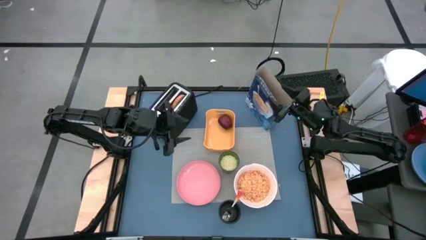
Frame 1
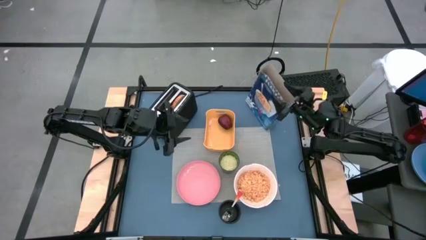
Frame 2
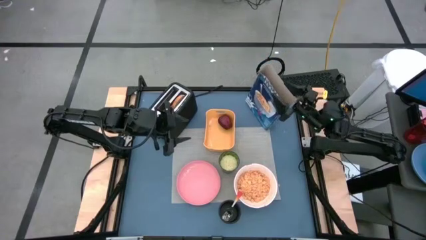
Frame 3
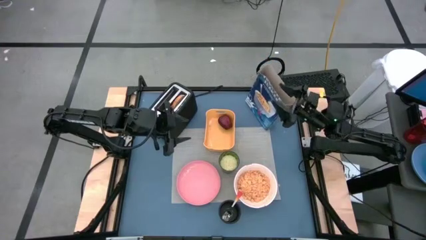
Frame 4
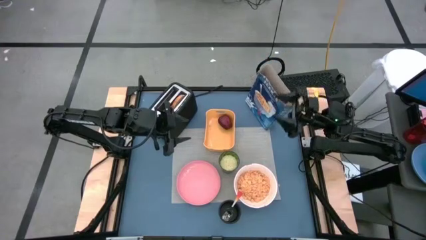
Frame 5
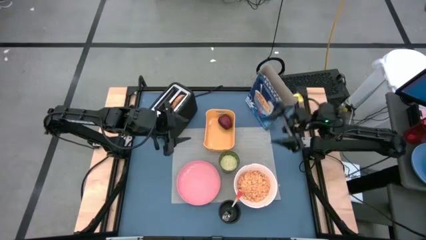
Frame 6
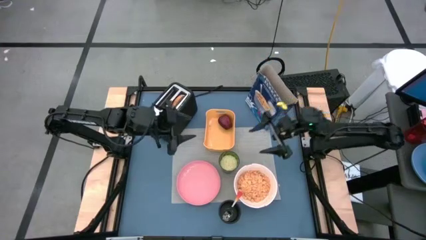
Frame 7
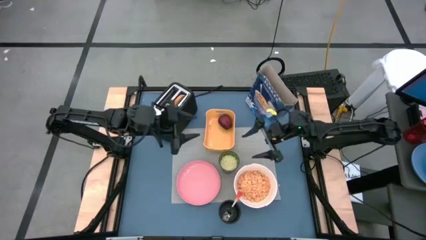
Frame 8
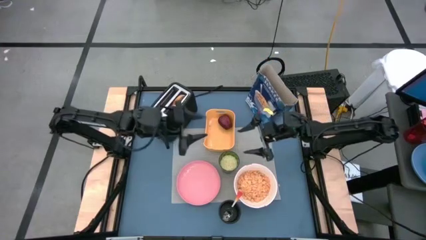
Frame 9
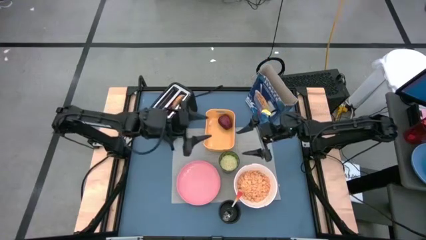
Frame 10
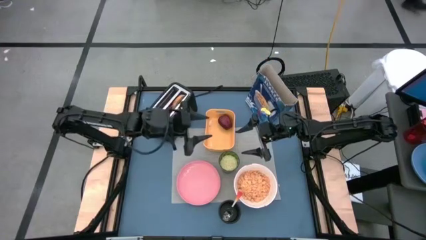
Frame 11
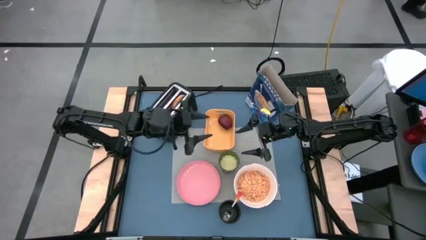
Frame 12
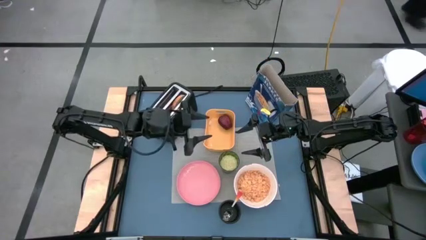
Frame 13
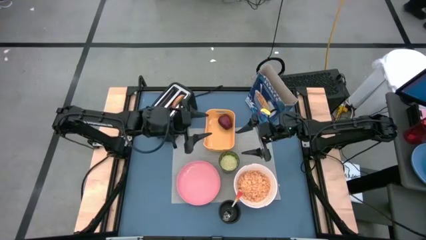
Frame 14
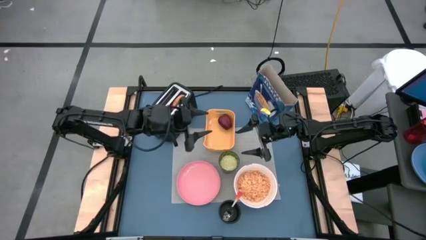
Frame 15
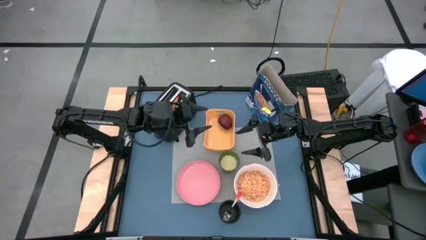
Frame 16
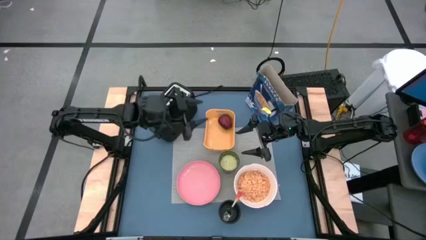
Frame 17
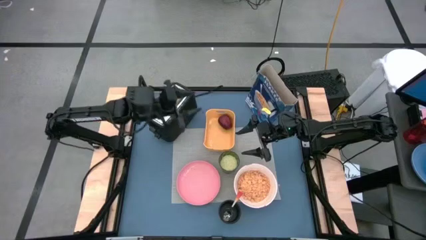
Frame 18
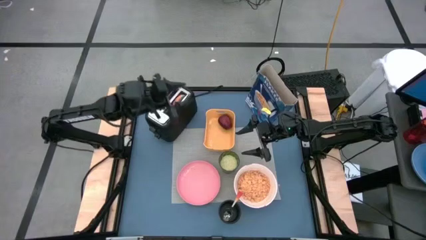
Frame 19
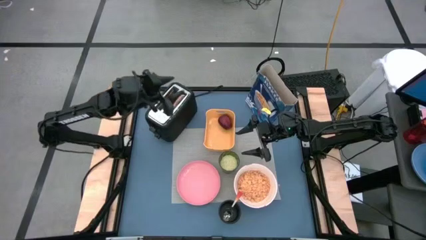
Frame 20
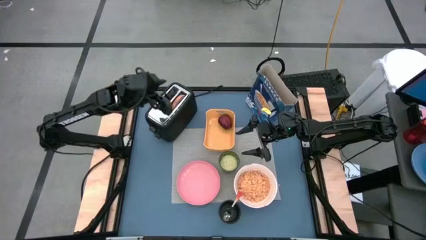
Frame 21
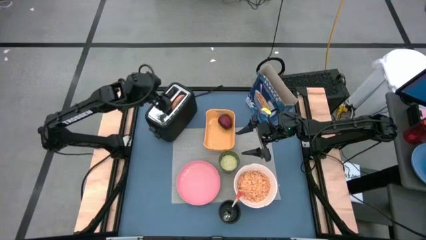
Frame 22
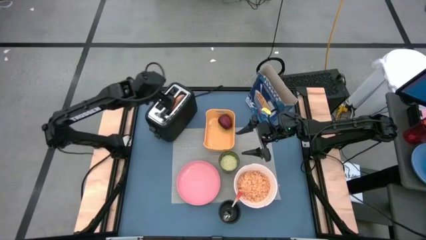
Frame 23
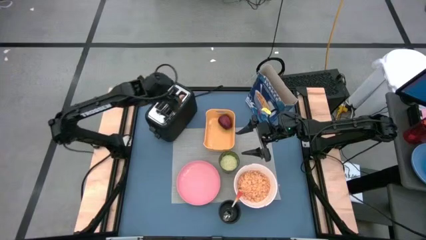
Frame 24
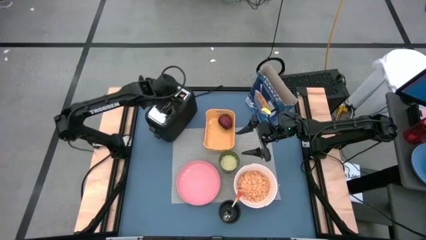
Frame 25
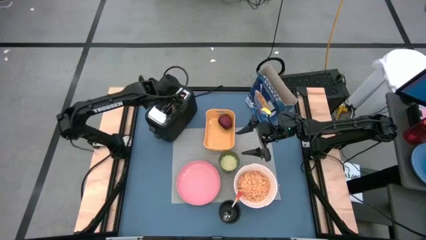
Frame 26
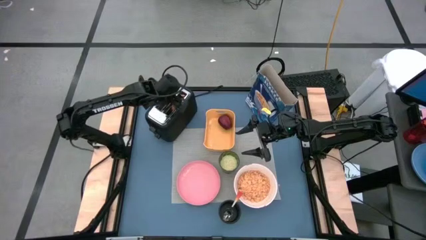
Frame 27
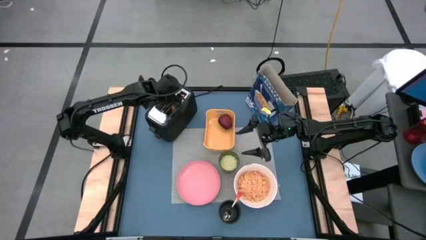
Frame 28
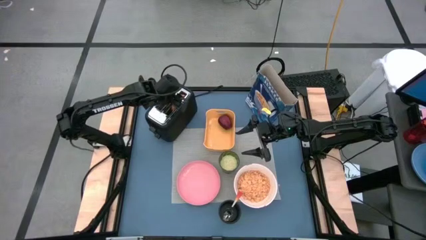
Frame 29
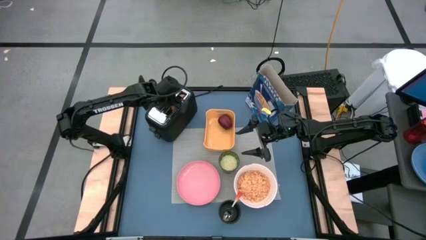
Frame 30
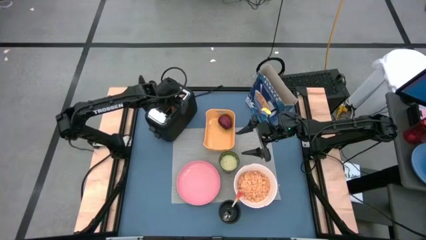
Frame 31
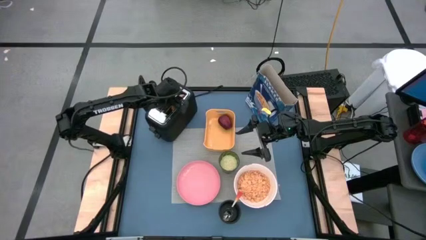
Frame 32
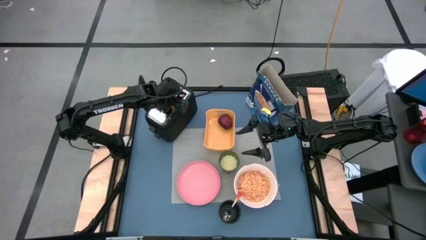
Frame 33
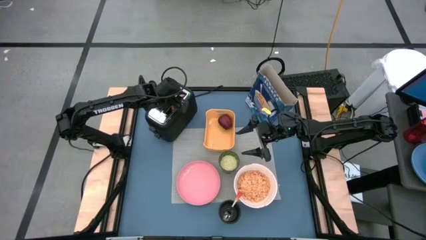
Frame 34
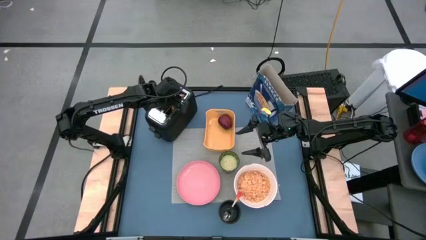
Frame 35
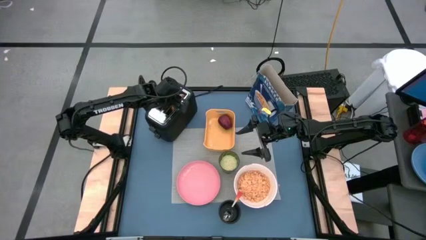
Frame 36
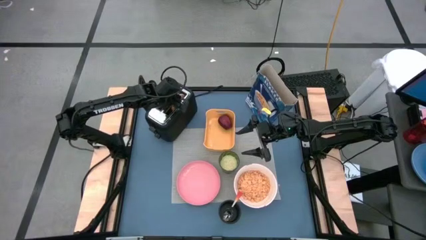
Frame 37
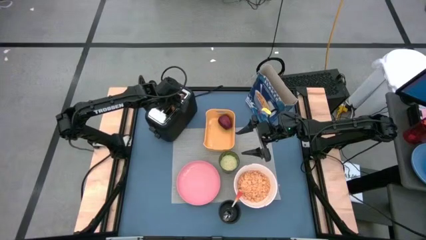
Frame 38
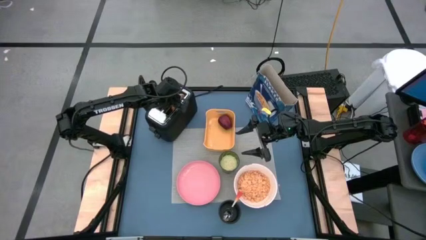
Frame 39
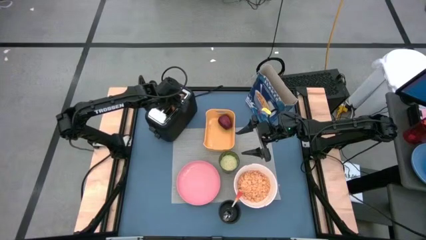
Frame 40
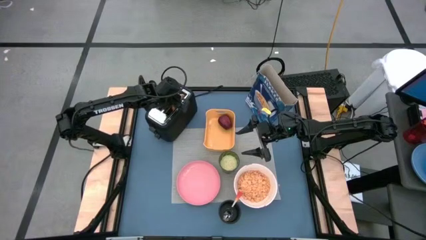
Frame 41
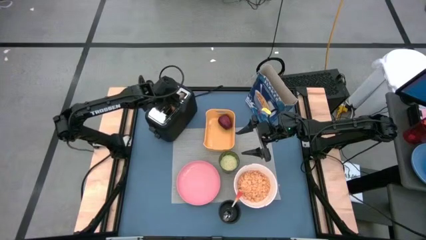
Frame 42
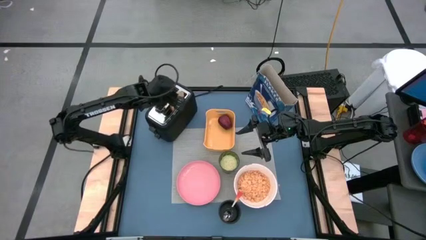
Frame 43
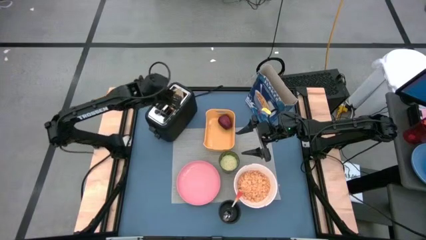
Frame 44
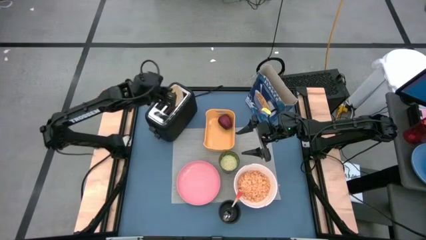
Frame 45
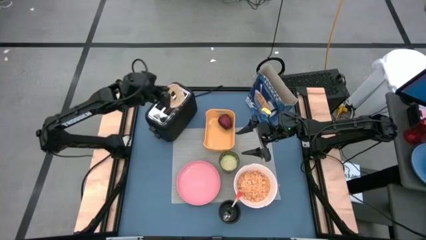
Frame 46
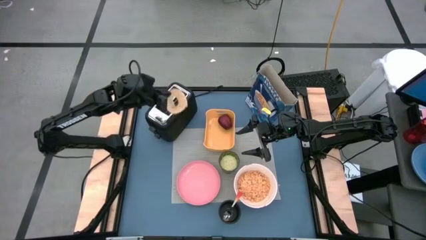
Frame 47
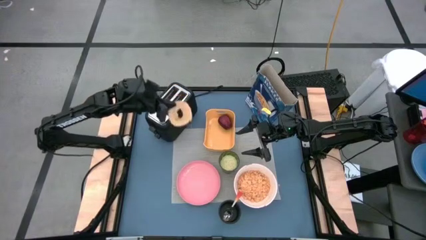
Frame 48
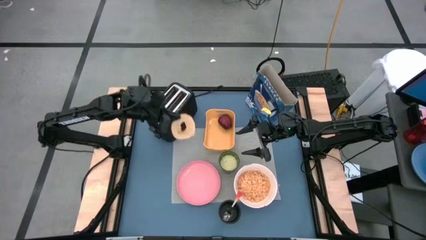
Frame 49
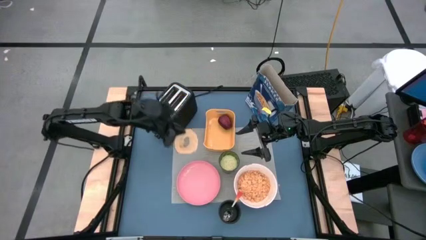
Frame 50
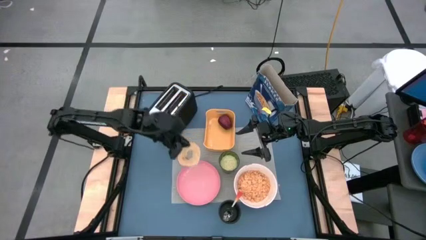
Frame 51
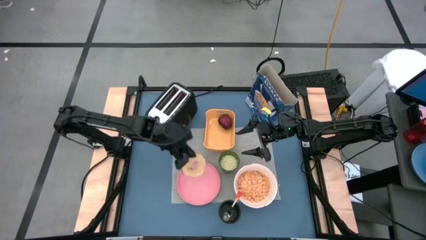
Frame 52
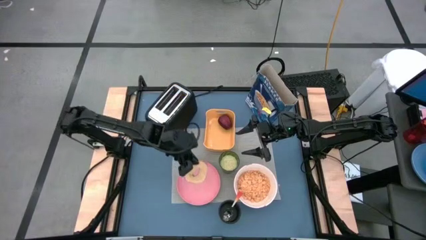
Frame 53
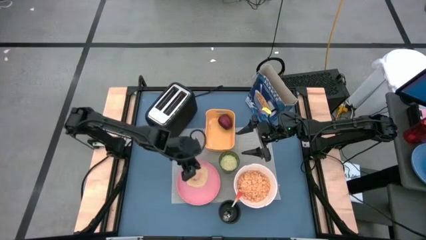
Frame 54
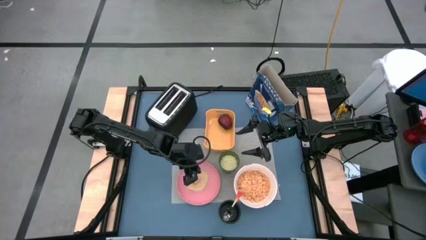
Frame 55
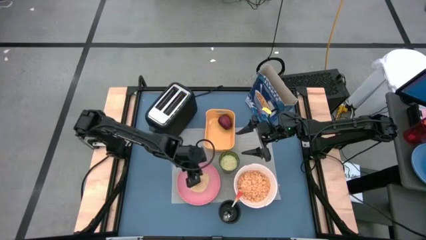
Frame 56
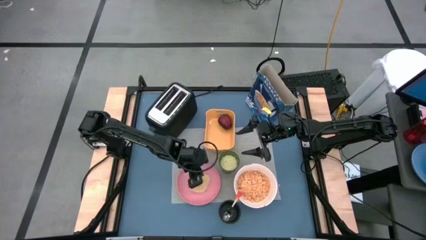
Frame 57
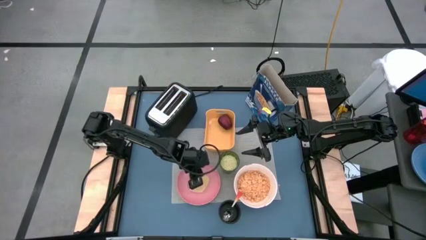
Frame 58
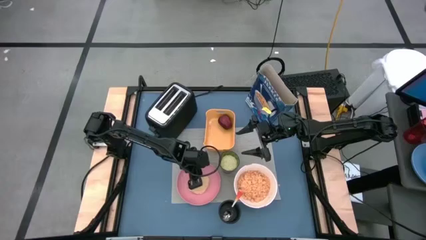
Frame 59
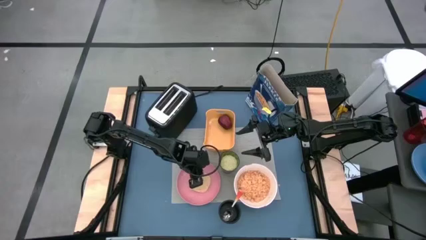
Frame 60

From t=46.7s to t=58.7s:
Task: Arrange a breakfast setting
Put the bagel from the toaster on the pink plate
